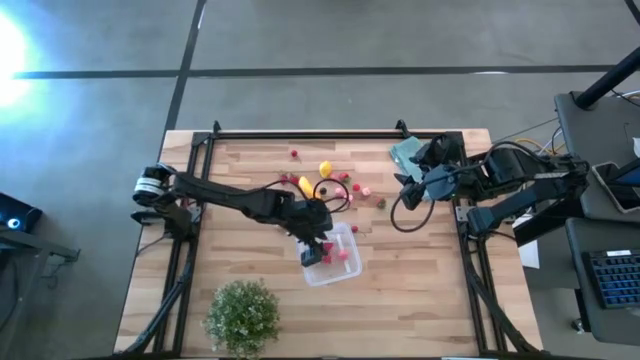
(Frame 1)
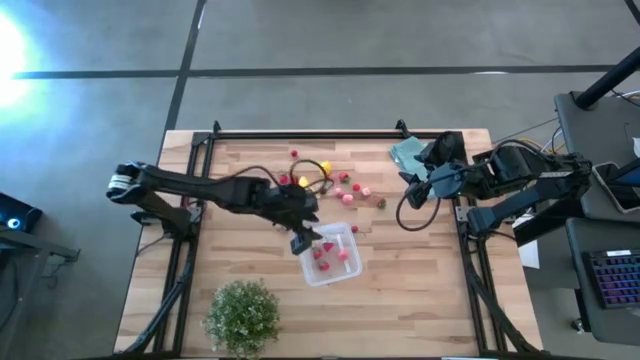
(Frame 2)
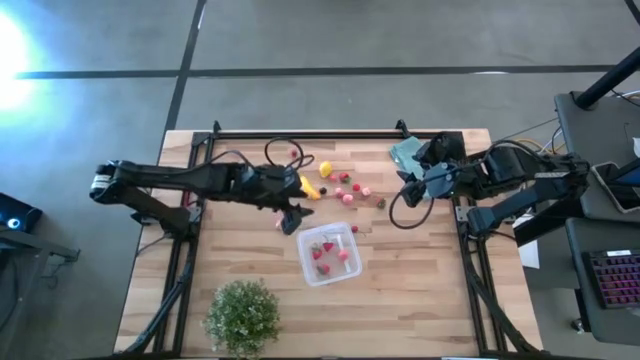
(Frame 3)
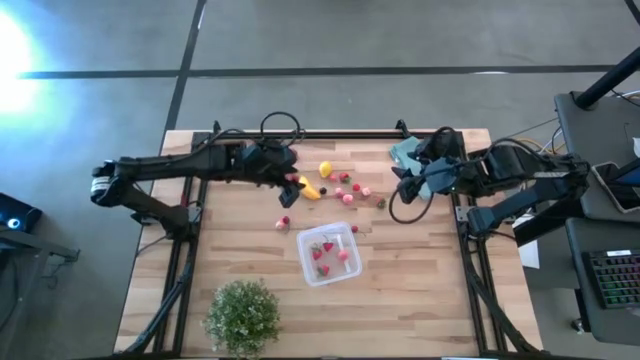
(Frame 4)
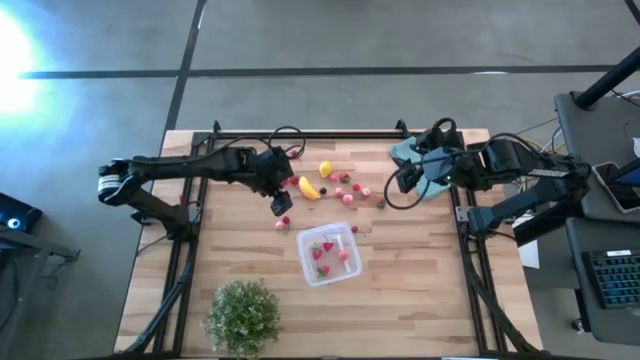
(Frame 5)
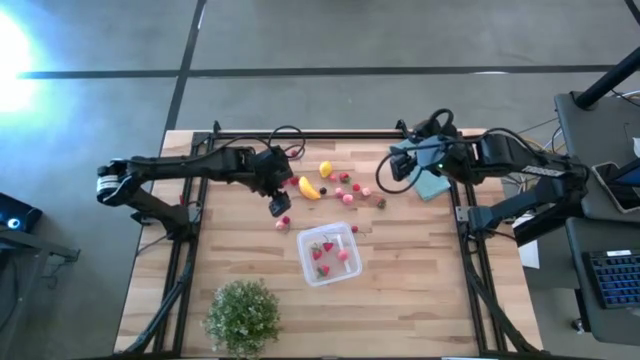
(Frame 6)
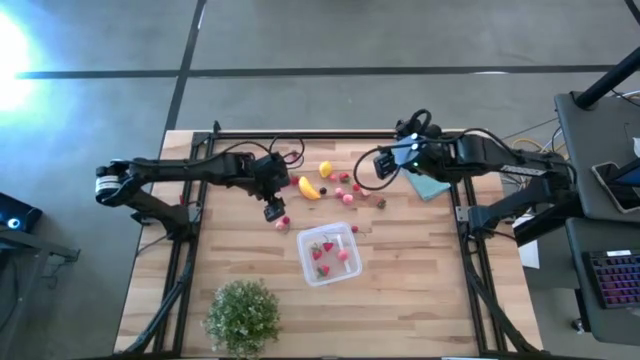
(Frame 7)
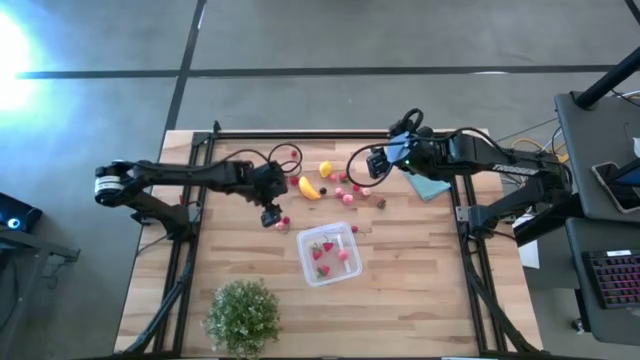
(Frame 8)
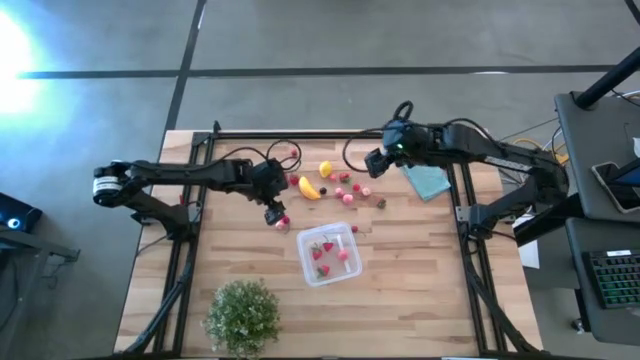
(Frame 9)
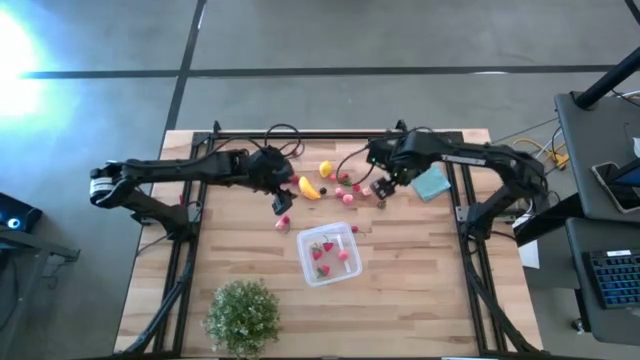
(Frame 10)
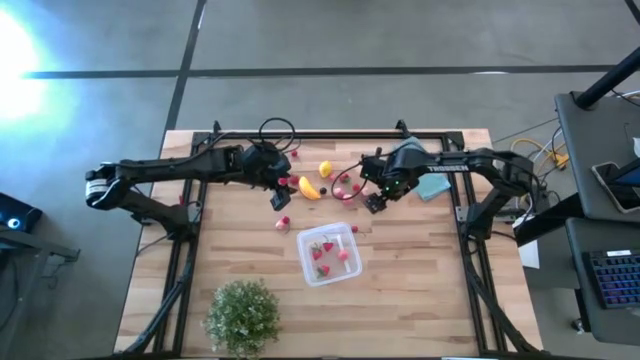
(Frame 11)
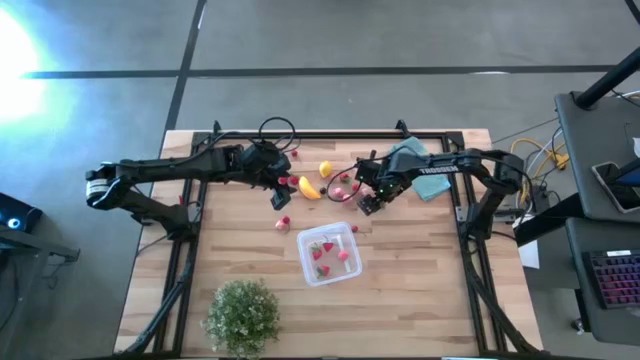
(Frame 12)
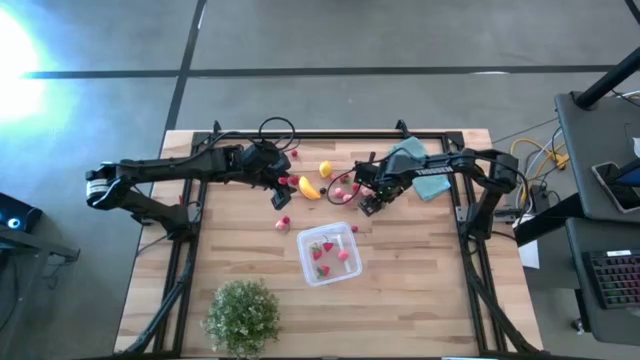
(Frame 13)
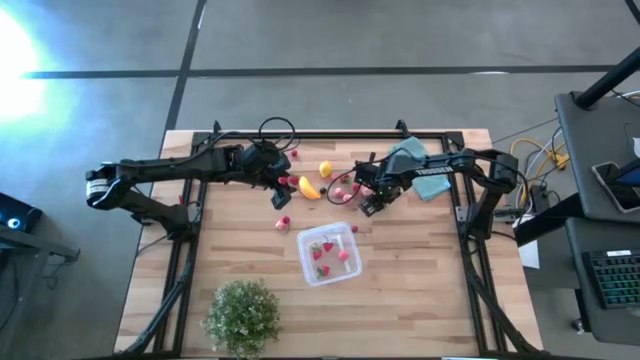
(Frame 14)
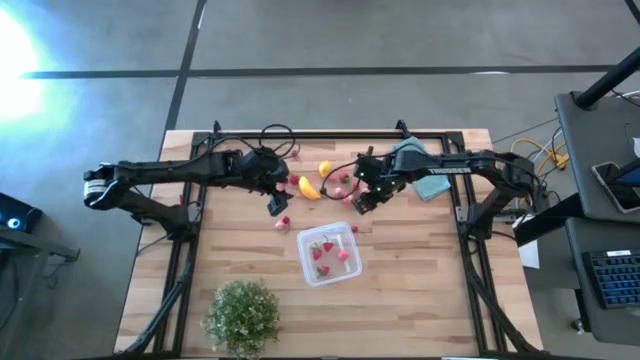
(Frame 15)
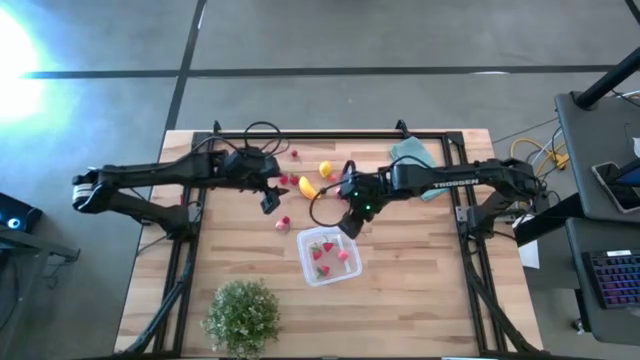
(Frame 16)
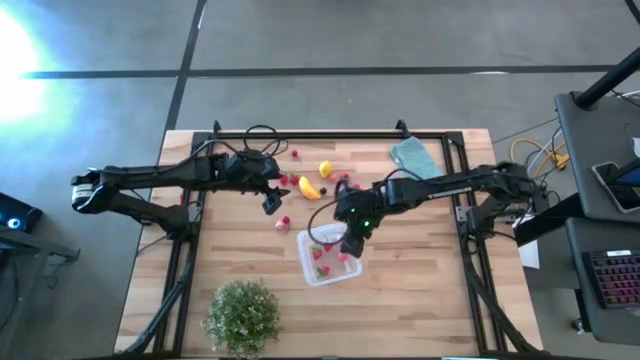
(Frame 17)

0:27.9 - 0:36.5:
Task: Pick and placing Produce into tupperware
Put the strawberry into the transparent bin

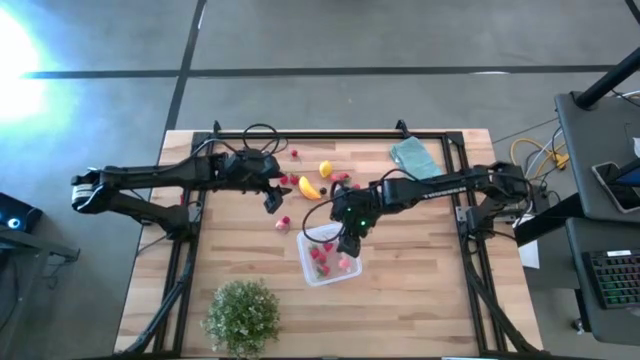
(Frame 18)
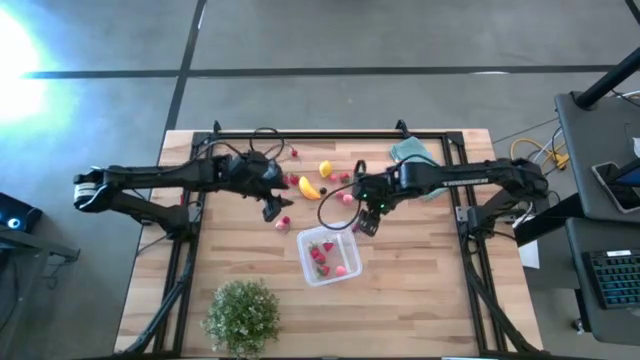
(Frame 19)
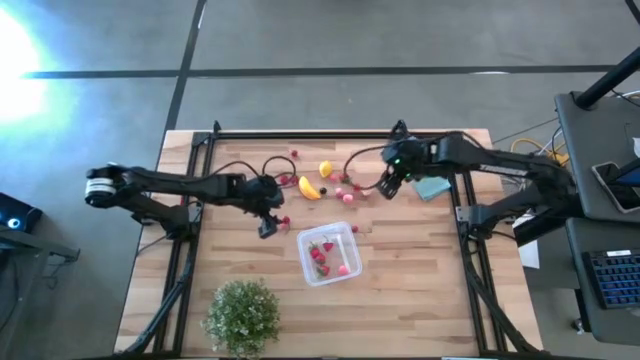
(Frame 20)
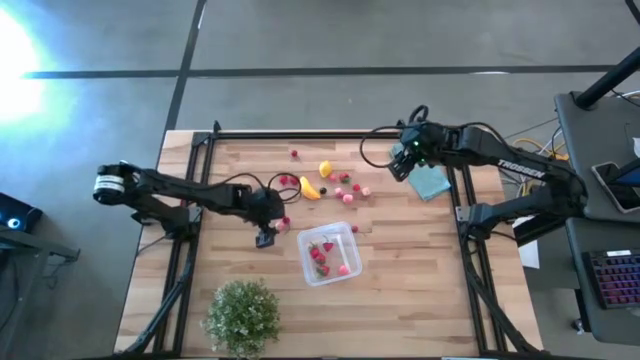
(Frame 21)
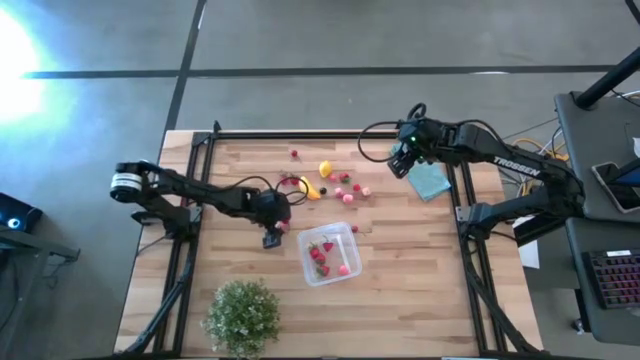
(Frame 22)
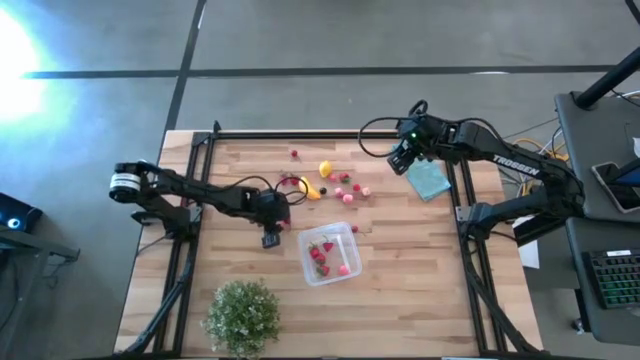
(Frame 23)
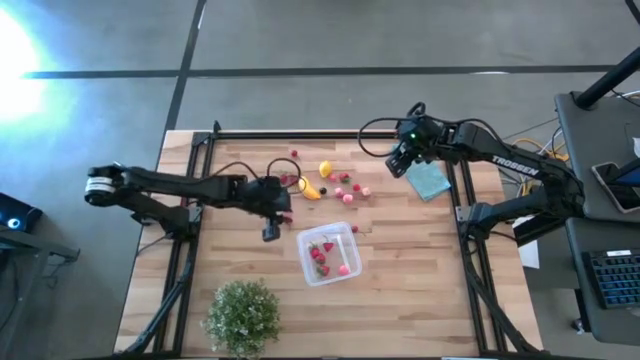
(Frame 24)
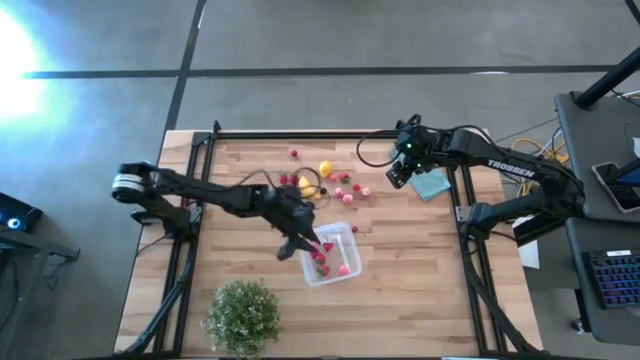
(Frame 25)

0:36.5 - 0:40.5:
Put the peach into the transparent bin

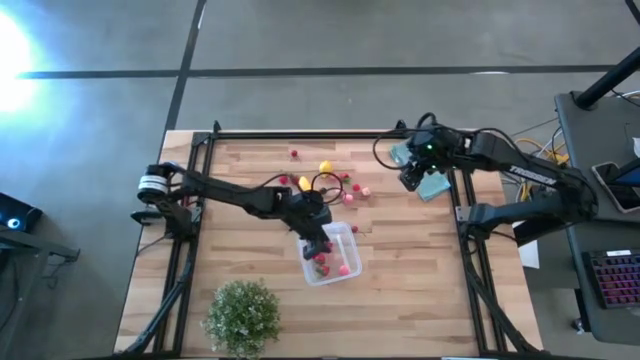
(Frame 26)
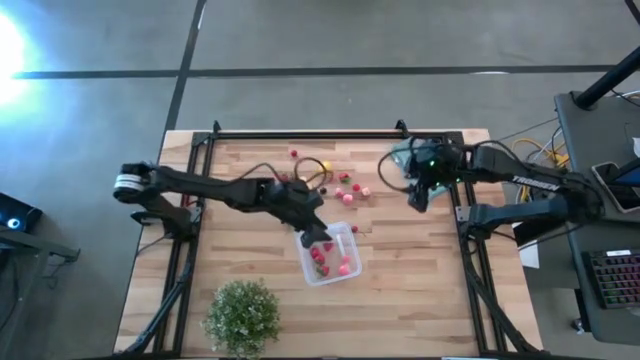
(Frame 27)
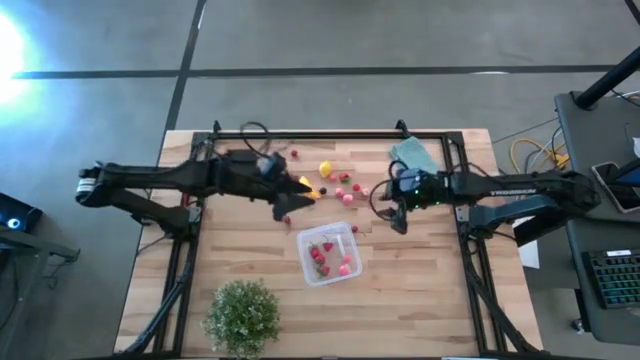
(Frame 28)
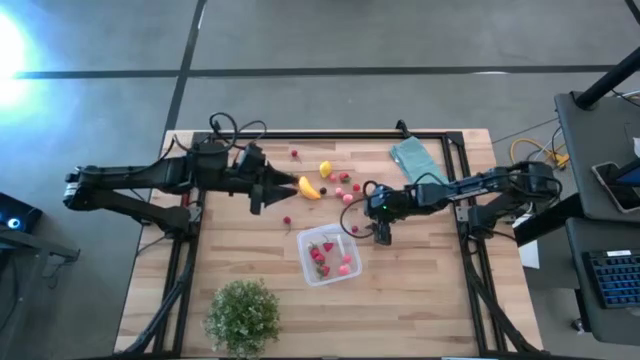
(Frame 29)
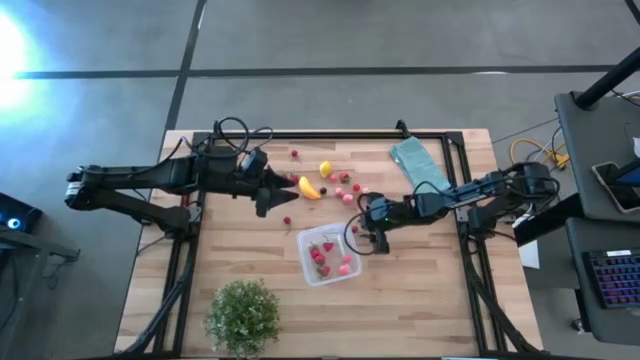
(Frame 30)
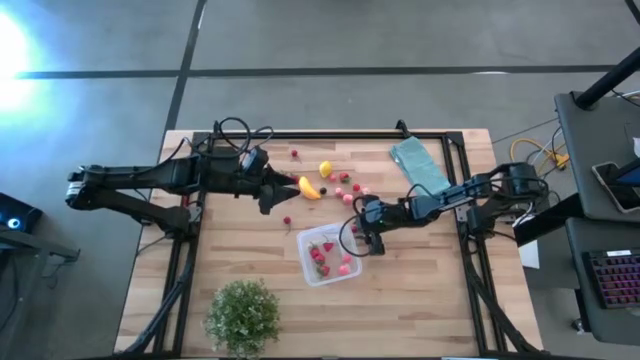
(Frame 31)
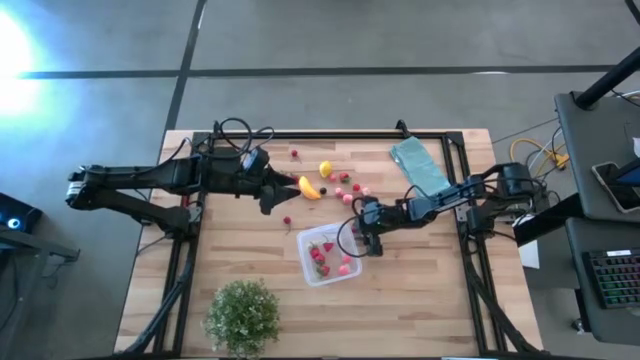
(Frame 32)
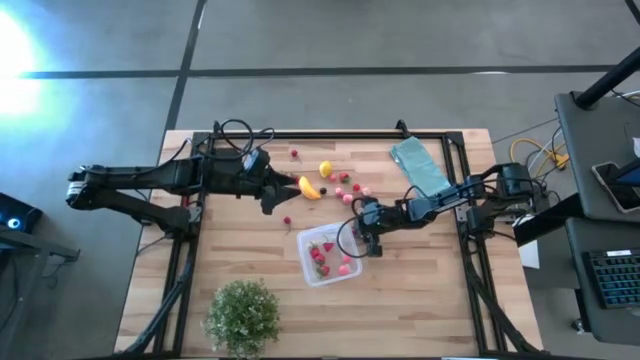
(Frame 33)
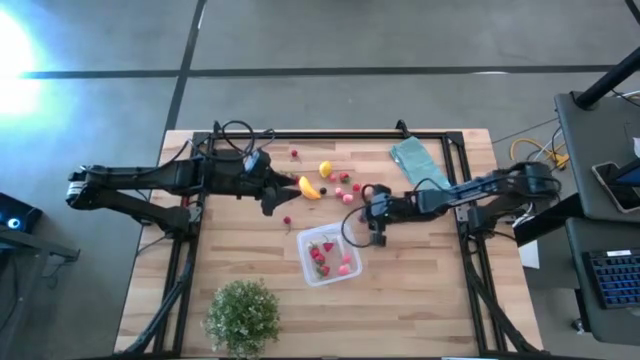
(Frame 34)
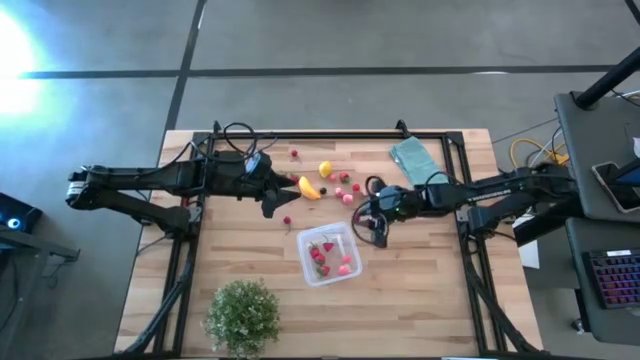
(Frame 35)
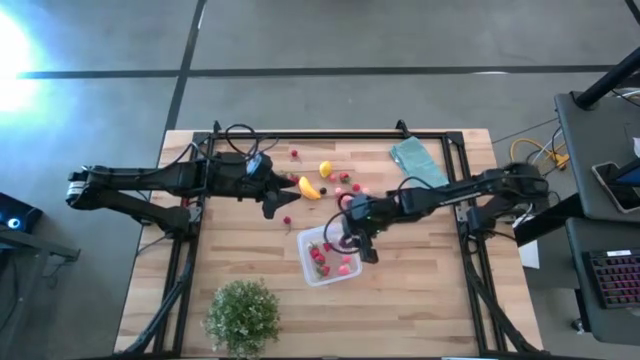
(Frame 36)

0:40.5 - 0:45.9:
Put the red cherry into the transparent bin

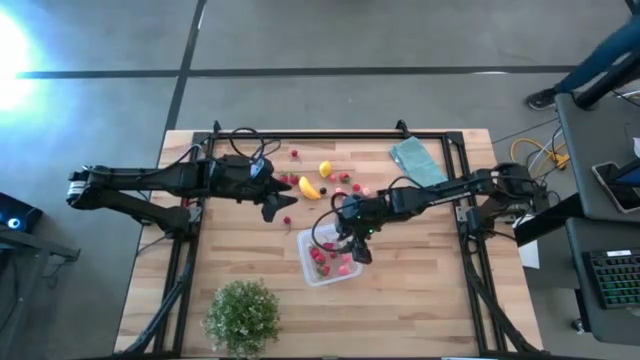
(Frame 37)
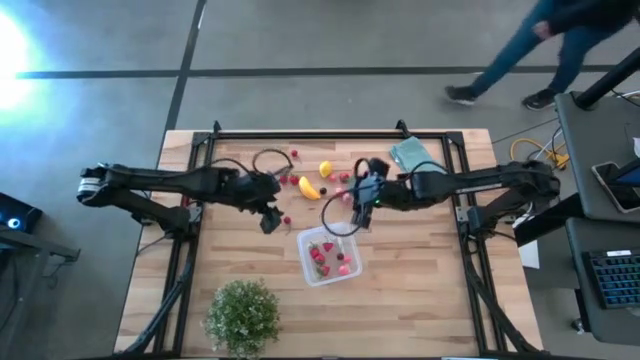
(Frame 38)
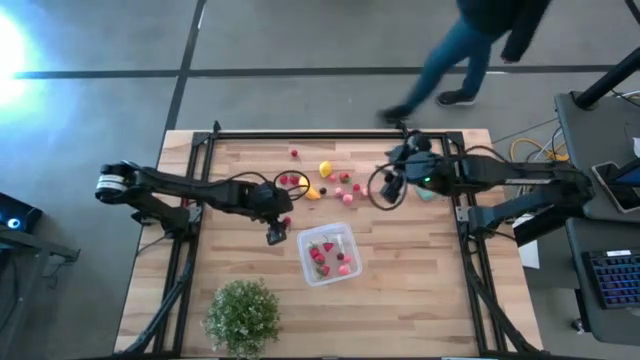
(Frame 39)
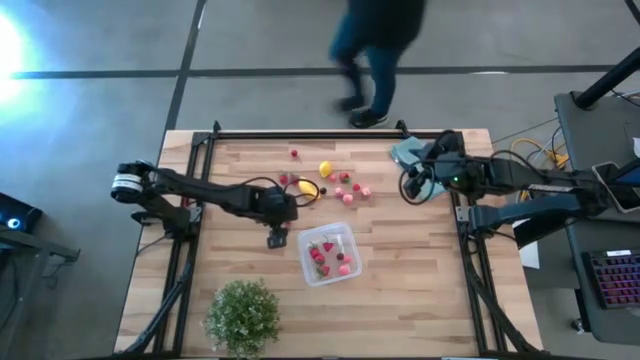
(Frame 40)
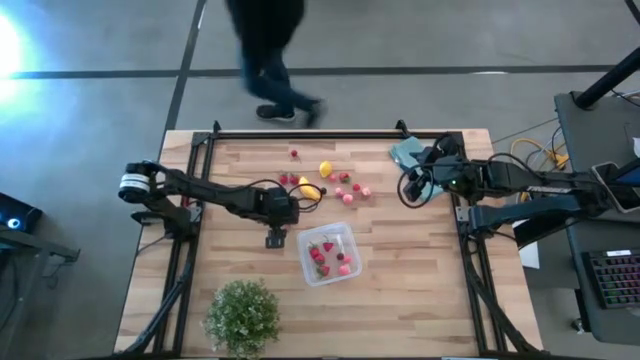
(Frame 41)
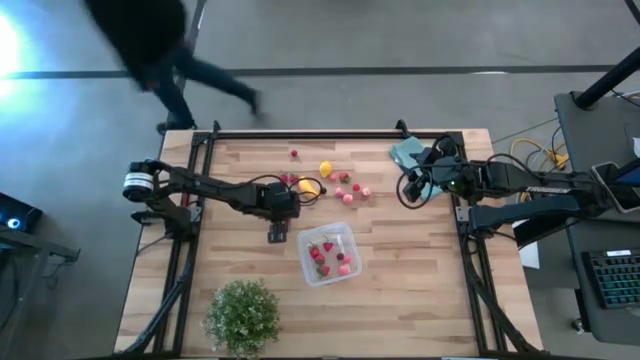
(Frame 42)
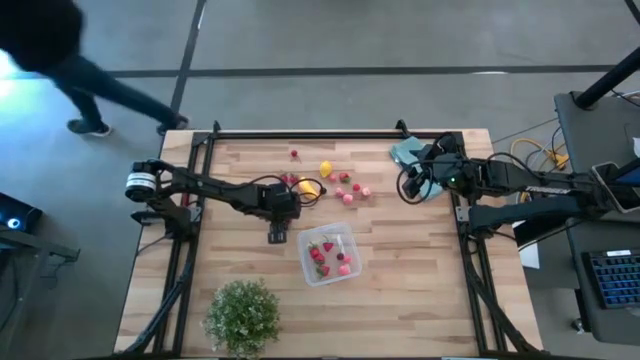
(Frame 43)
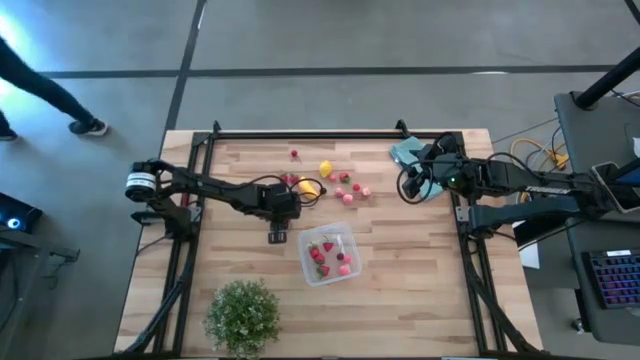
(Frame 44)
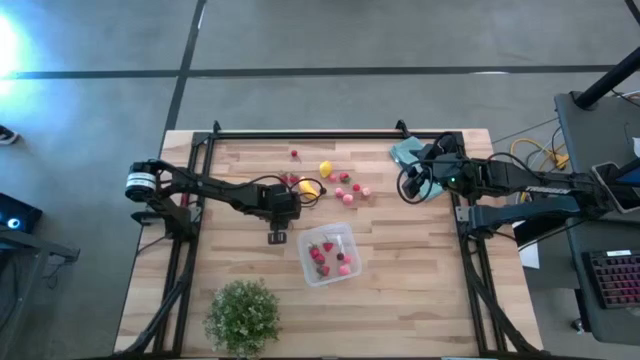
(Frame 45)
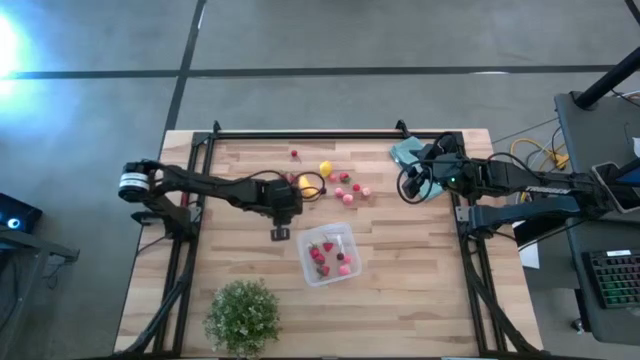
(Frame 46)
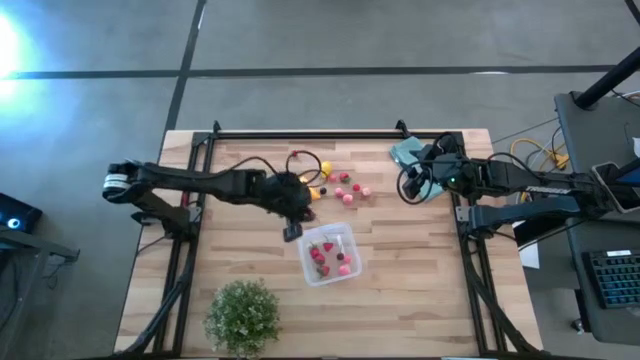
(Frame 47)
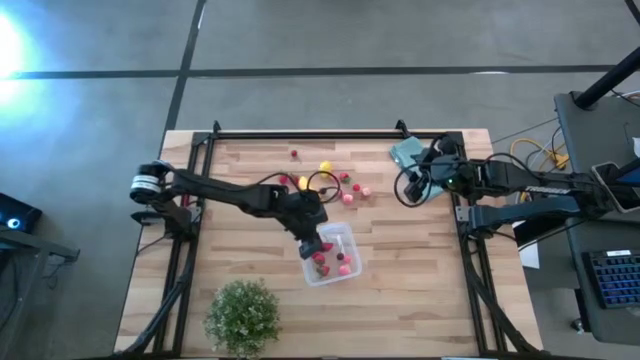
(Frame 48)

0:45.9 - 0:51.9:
Put the red cherry into the transparent bin
